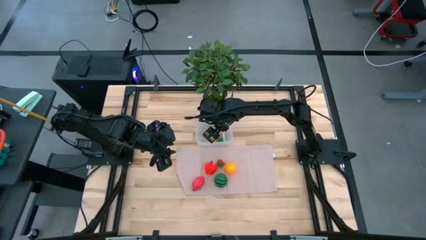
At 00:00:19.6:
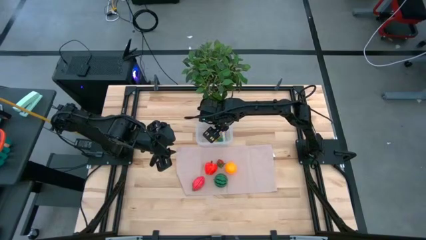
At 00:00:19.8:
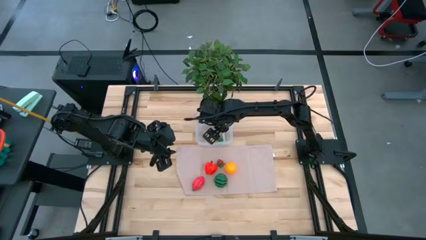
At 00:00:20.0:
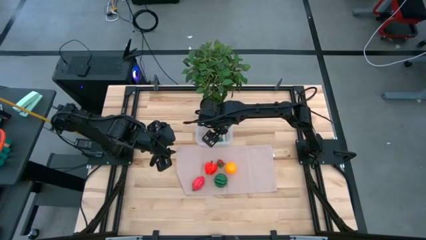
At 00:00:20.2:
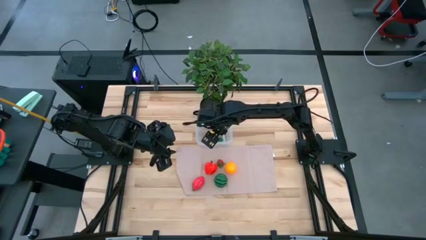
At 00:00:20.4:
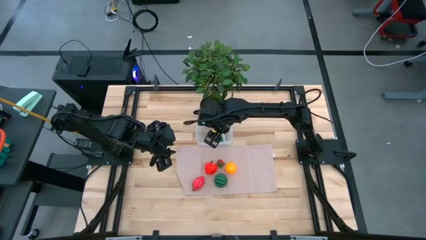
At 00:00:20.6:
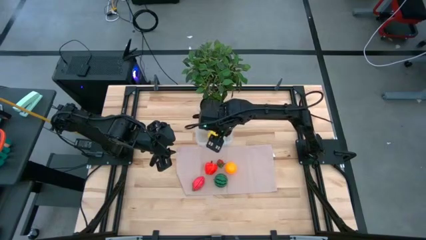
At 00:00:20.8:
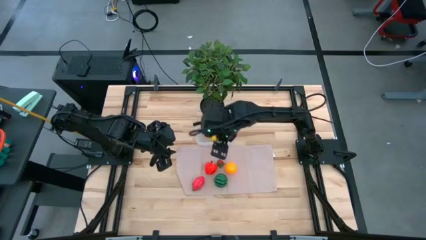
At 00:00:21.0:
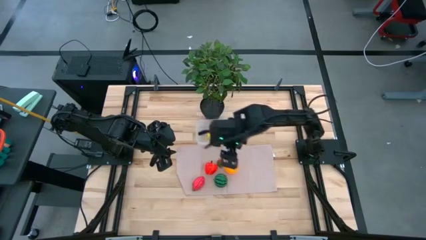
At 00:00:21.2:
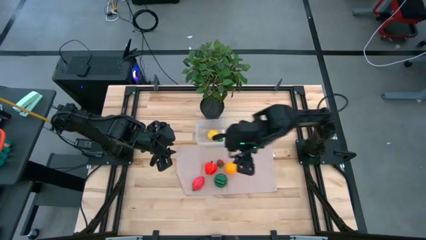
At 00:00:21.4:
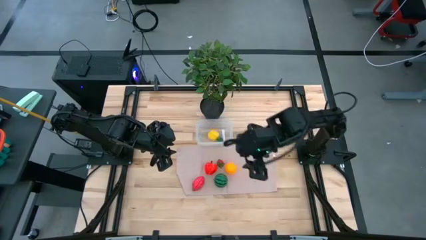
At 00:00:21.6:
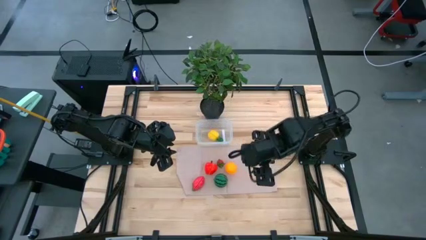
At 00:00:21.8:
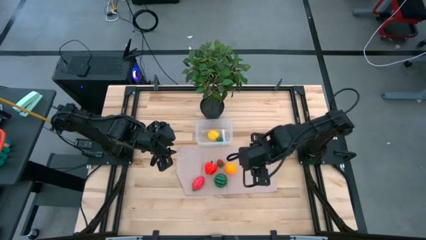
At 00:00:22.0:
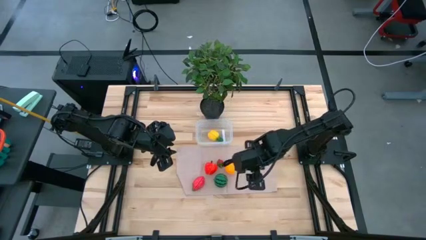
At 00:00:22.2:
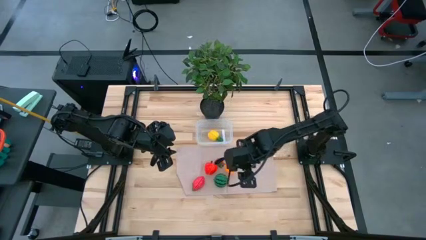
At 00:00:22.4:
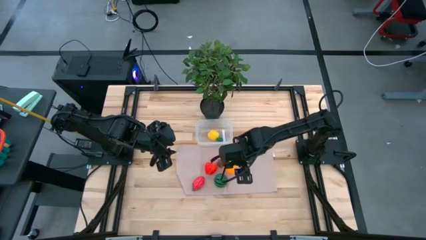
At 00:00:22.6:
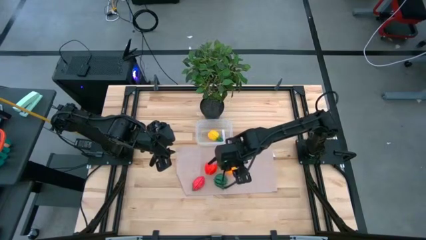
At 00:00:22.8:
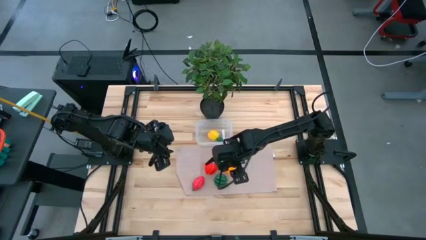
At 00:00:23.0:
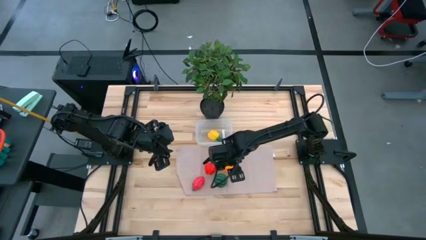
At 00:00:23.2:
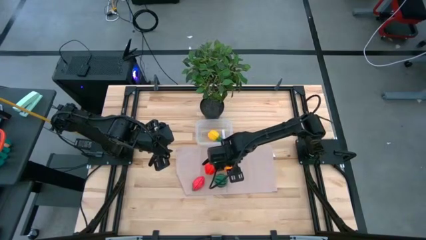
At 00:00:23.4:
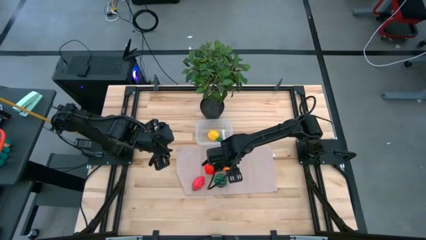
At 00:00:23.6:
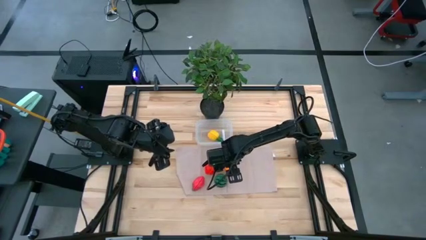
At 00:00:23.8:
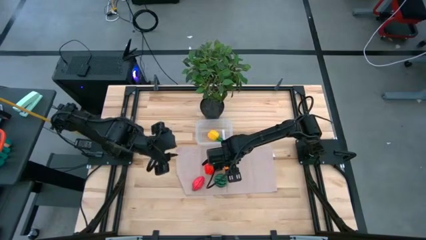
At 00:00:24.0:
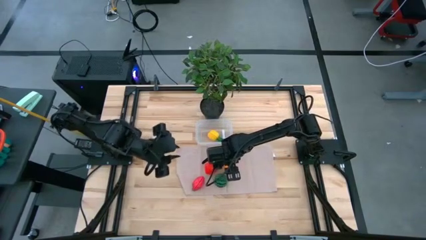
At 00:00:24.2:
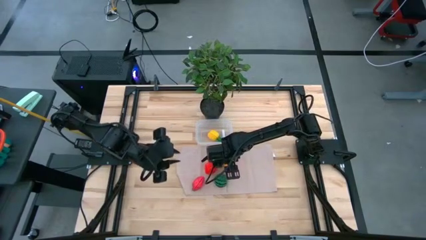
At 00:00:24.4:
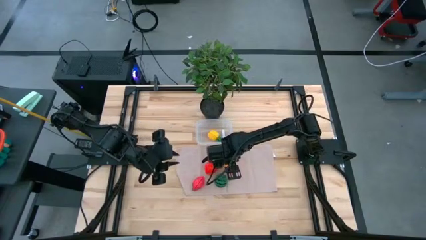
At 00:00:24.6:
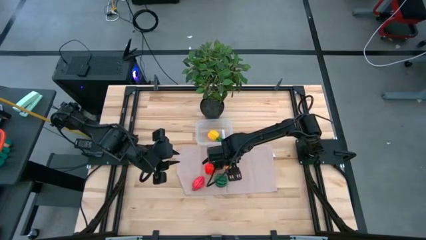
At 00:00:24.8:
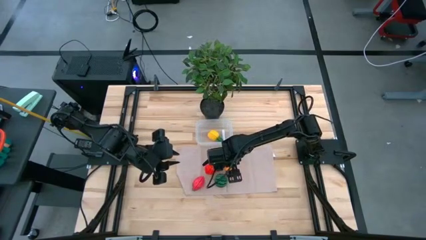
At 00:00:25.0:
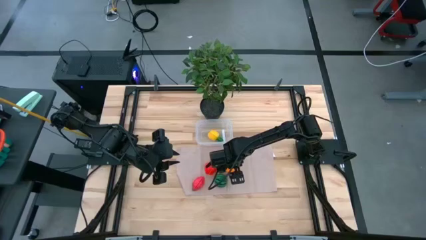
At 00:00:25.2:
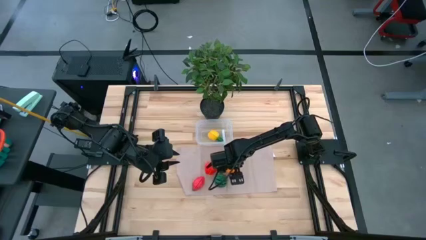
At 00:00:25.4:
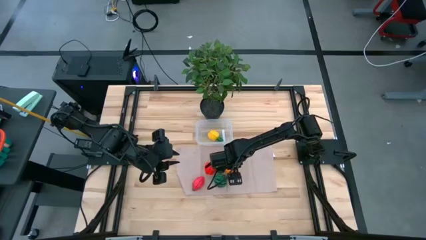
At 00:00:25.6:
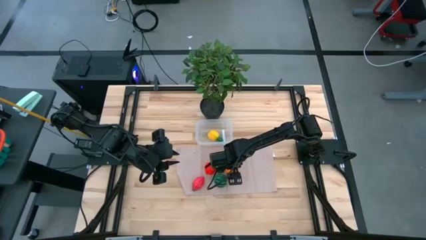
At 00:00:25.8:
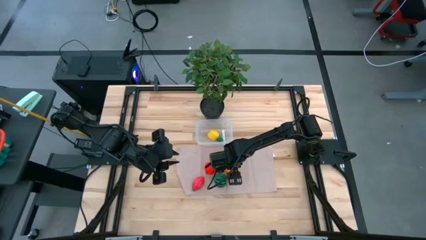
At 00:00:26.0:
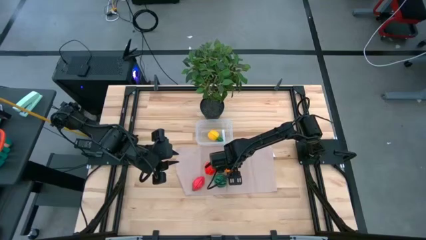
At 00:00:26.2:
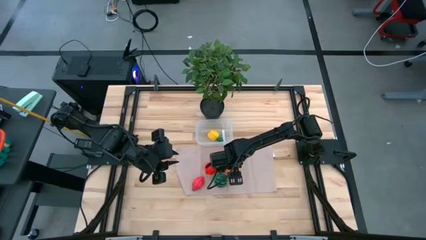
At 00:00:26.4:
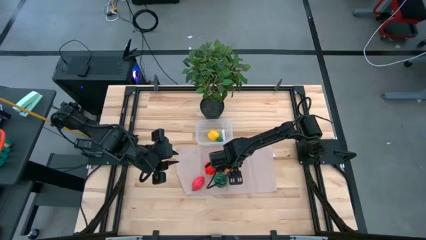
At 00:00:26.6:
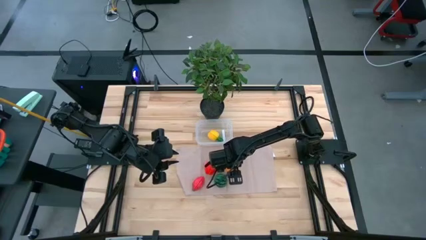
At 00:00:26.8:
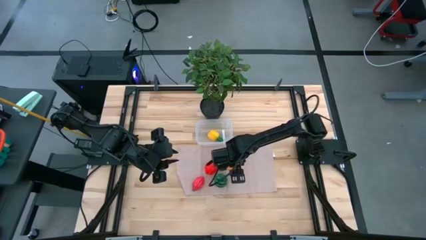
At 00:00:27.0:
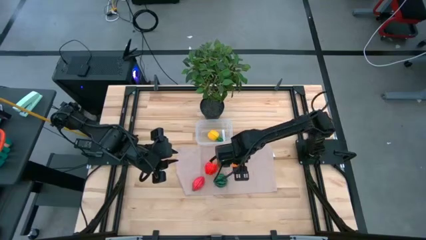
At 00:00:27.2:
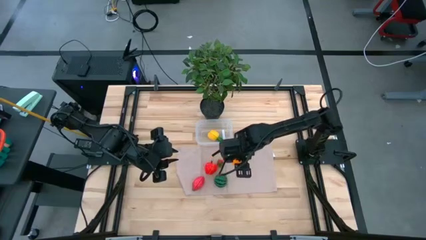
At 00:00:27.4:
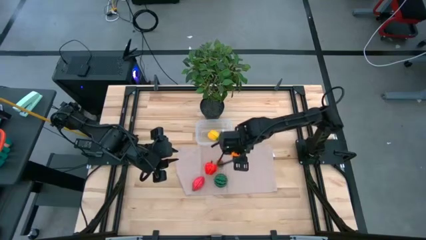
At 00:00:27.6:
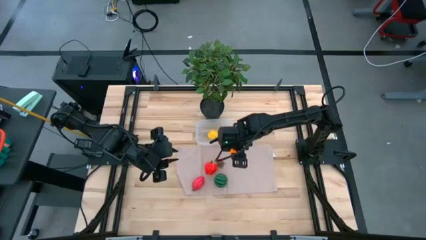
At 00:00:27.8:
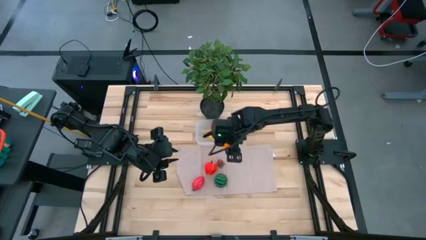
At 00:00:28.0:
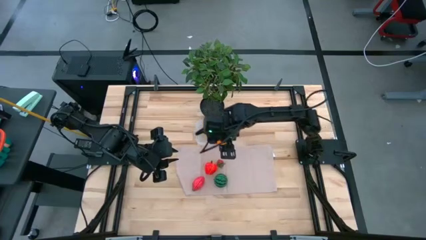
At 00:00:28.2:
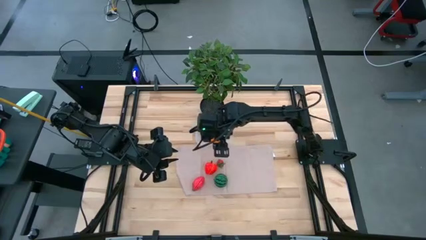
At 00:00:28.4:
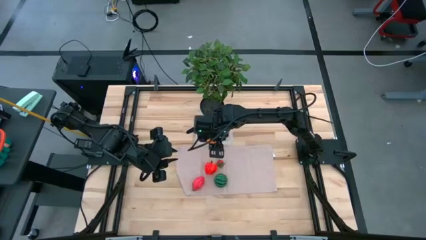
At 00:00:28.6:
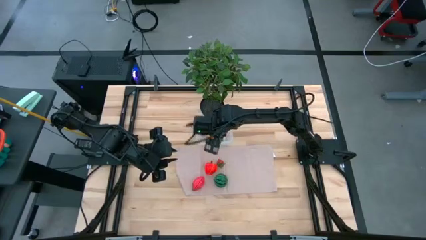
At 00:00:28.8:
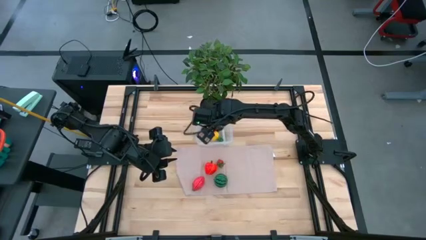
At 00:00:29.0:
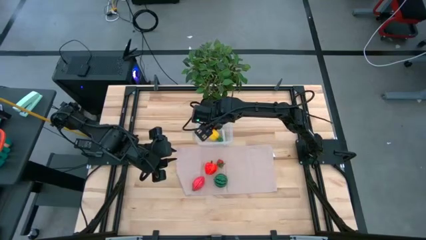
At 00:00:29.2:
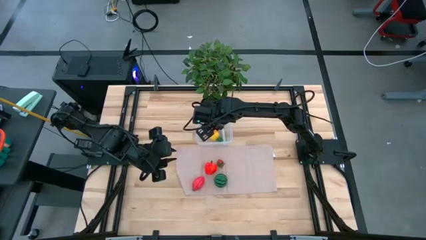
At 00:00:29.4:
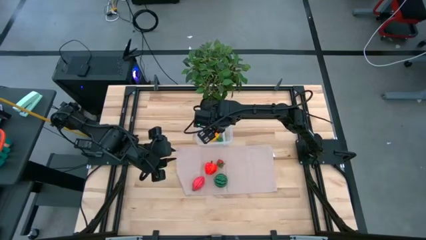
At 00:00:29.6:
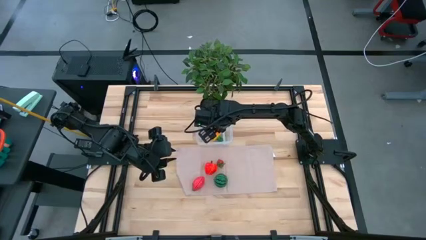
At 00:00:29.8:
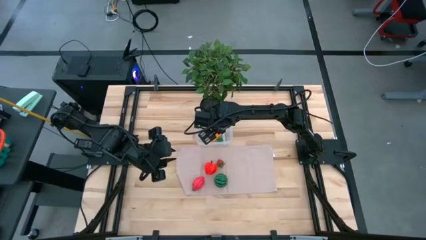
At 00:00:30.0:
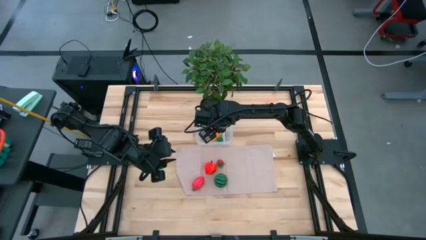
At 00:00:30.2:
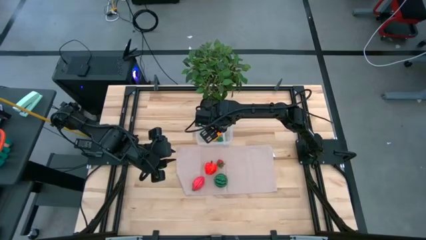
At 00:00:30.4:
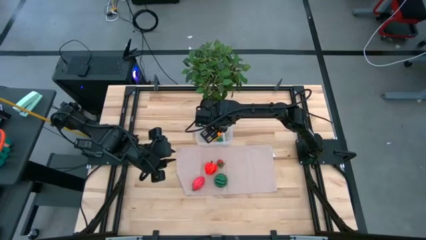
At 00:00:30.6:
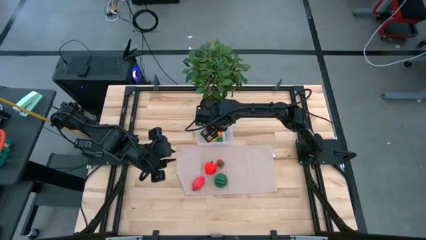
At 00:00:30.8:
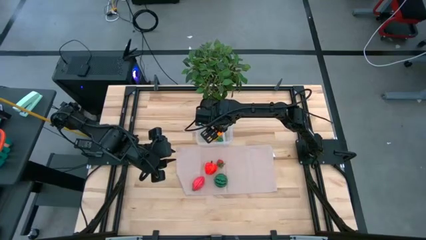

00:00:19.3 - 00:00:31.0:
Task: Pick and placing Produce into tupperware
Put the orange into the transparent bin
